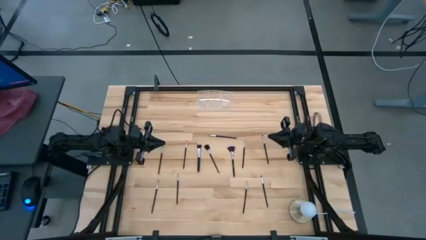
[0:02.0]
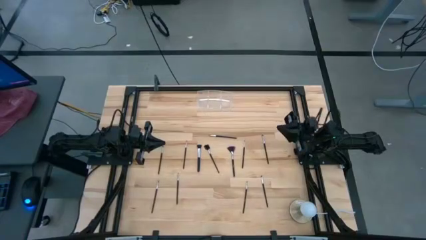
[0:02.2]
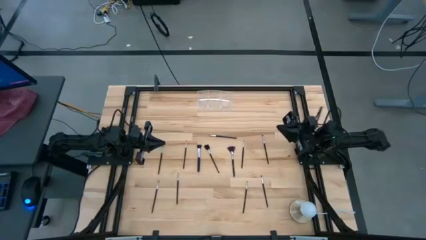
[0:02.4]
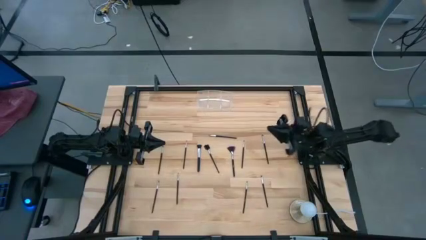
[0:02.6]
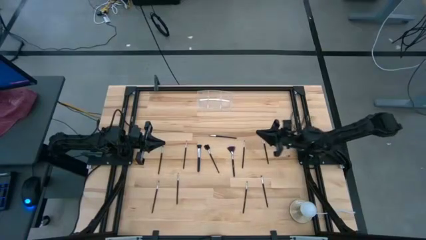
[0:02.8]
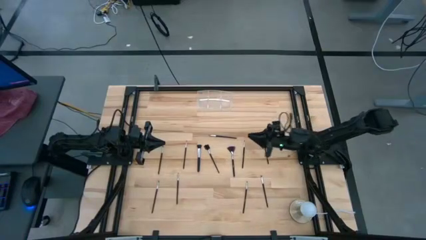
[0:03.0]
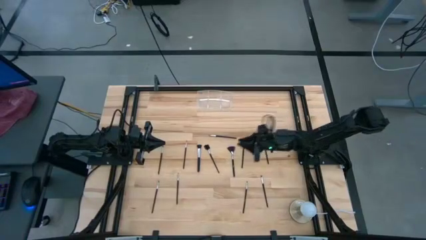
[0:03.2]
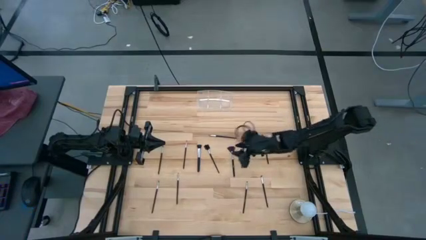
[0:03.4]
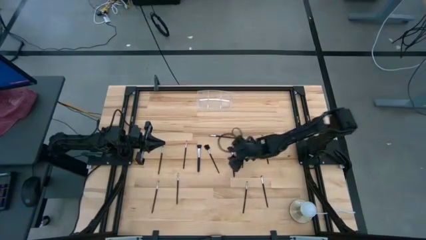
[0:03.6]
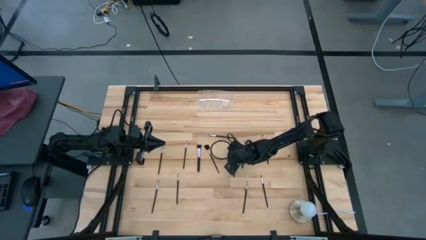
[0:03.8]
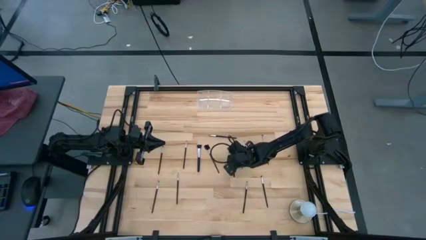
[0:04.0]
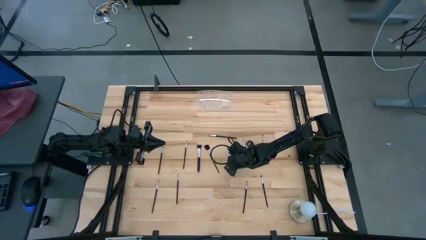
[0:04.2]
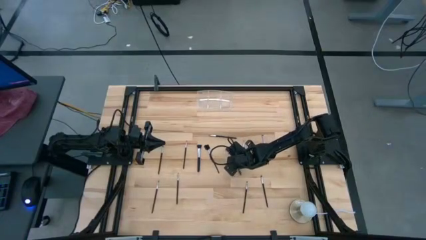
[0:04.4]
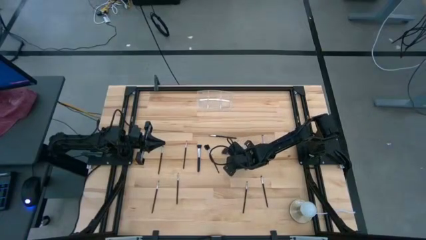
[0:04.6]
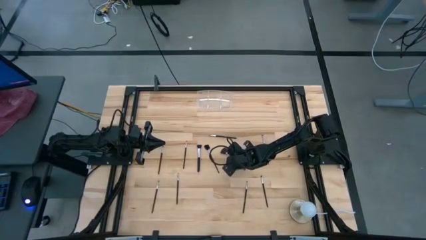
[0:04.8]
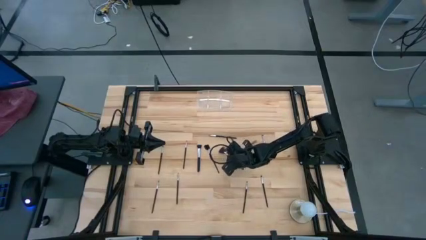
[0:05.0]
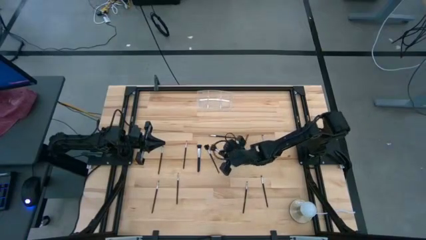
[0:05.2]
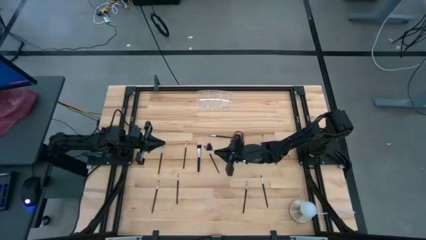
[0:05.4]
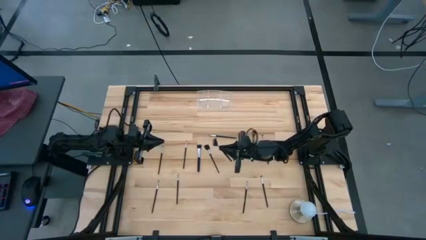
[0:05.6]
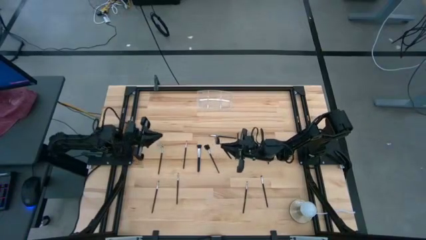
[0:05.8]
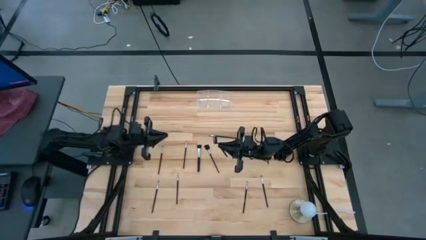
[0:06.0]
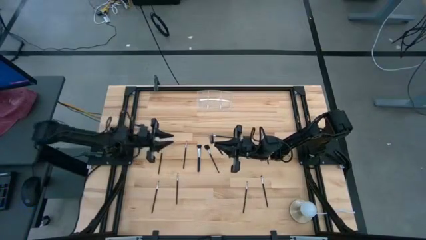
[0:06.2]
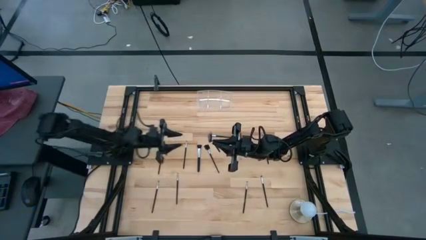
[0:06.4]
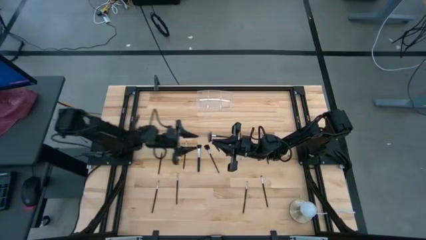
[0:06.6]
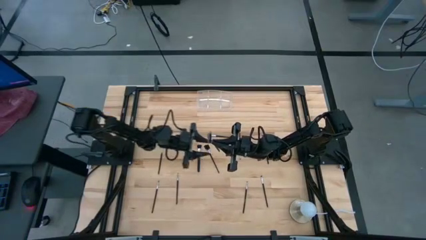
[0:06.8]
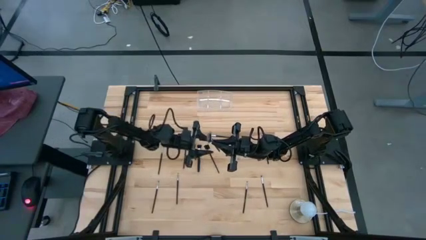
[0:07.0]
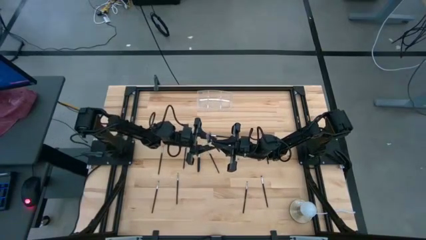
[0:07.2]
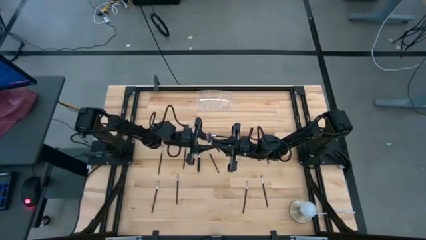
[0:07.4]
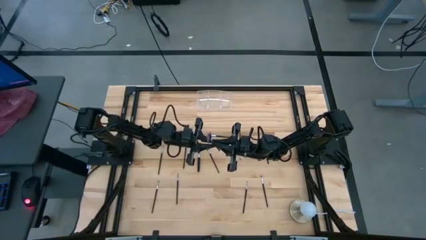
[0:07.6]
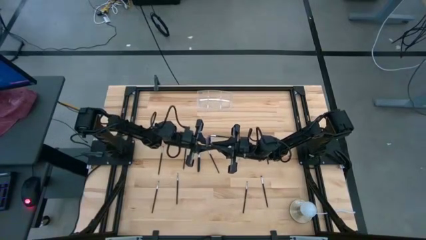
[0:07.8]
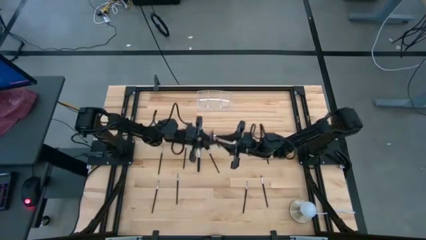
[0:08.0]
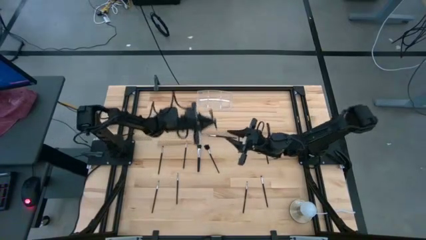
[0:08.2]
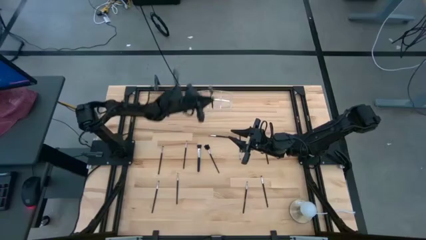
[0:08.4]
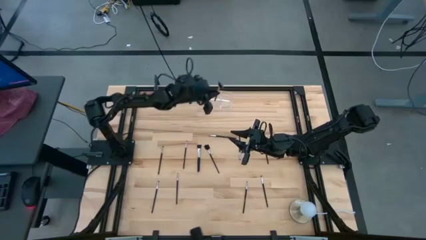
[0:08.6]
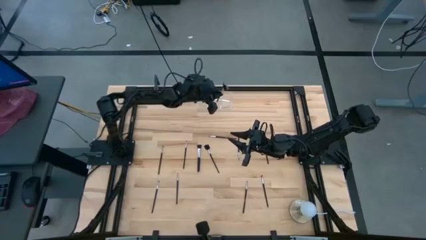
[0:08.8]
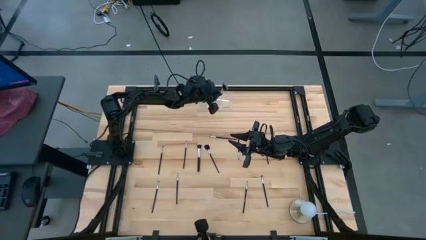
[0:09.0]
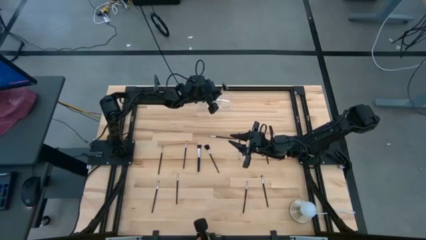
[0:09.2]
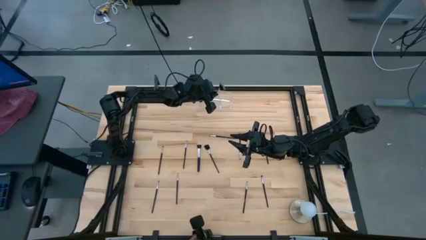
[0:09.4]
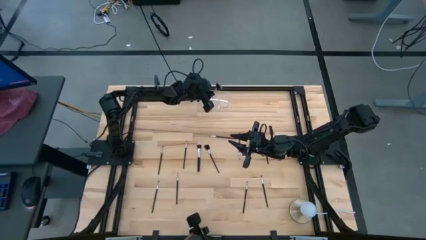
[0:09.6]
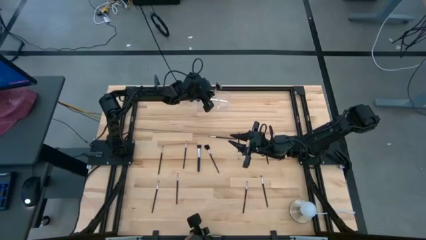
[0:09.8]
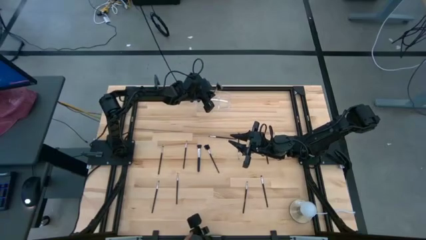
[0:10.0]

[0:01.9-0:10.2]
Task: Put items in baskets/containers
Put the black highlighter brush into the transparent organizer

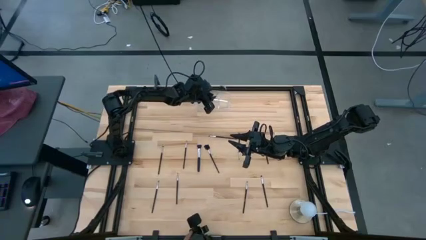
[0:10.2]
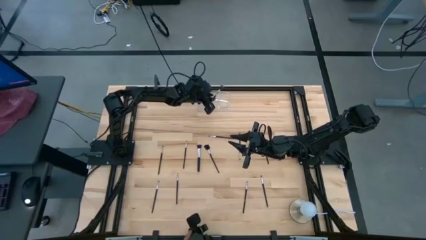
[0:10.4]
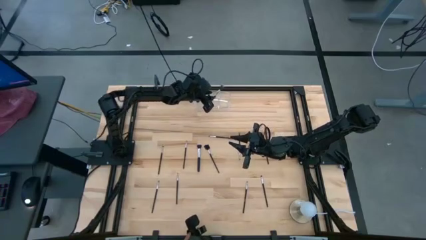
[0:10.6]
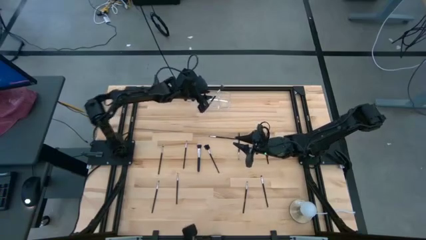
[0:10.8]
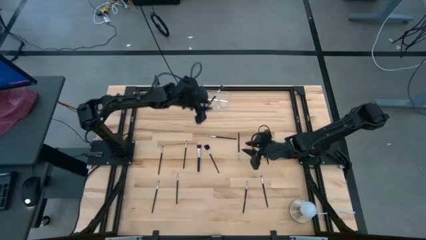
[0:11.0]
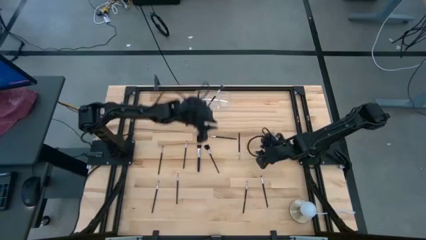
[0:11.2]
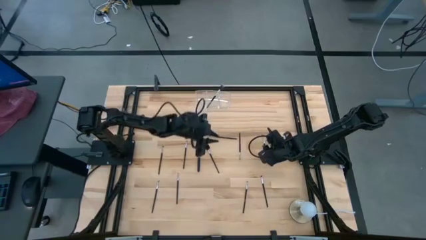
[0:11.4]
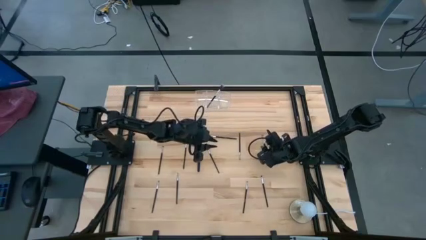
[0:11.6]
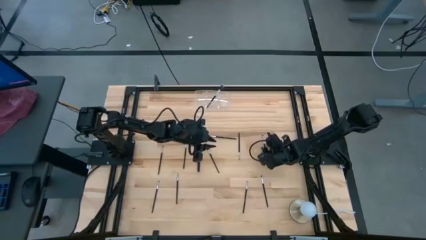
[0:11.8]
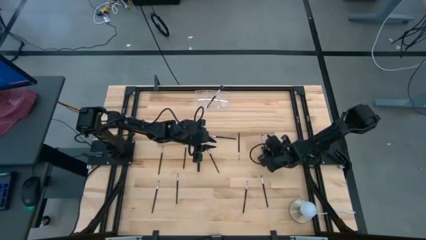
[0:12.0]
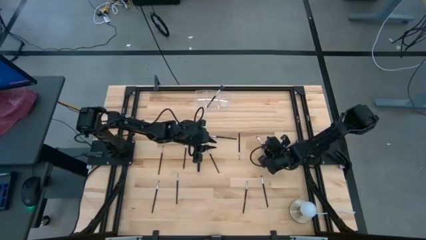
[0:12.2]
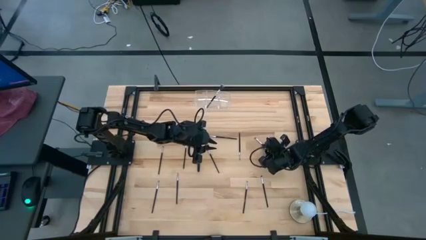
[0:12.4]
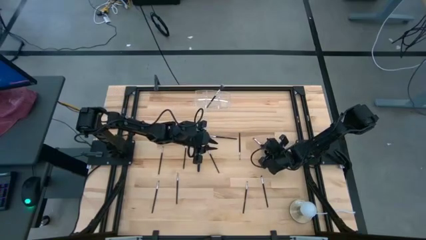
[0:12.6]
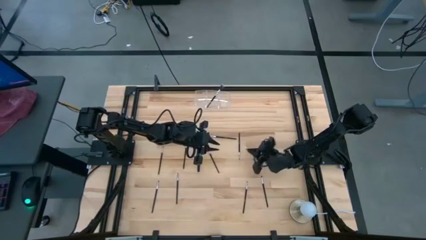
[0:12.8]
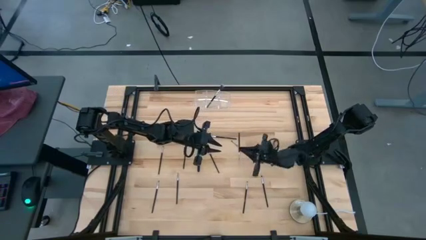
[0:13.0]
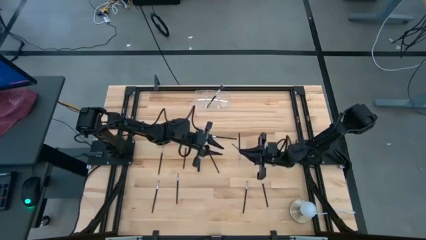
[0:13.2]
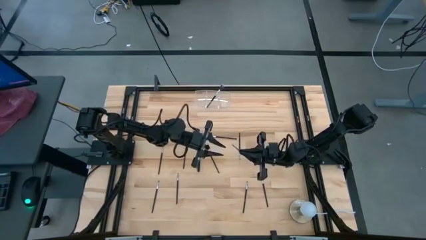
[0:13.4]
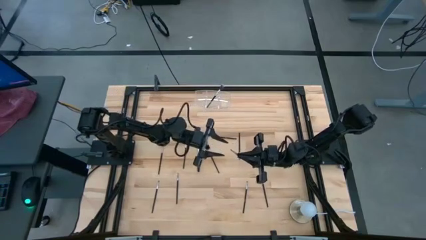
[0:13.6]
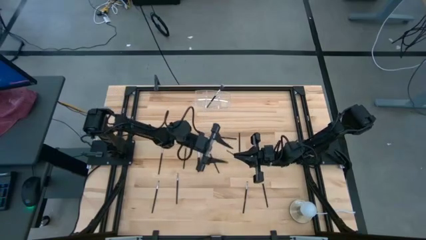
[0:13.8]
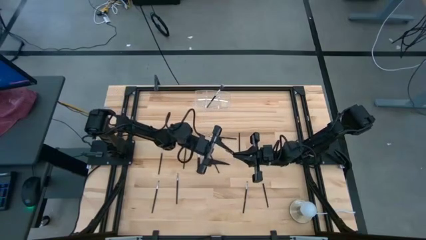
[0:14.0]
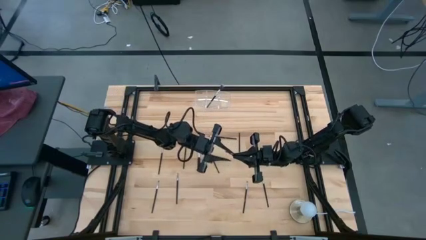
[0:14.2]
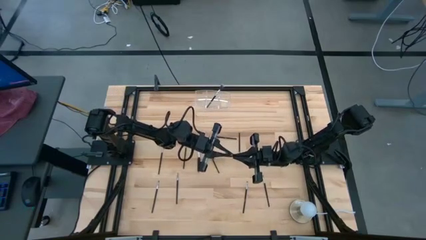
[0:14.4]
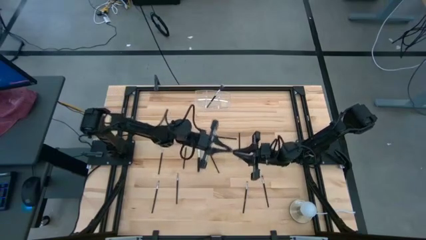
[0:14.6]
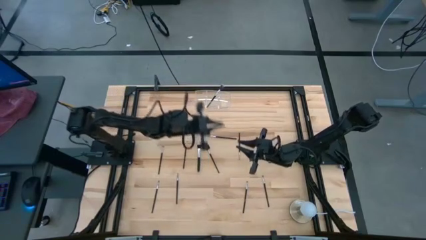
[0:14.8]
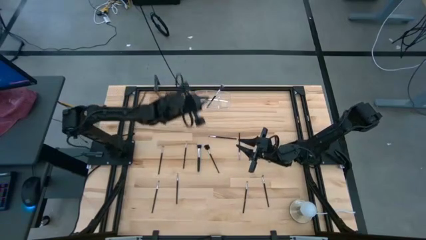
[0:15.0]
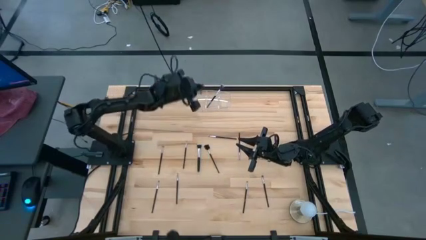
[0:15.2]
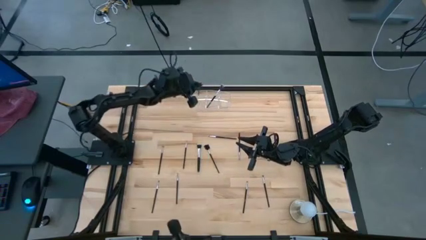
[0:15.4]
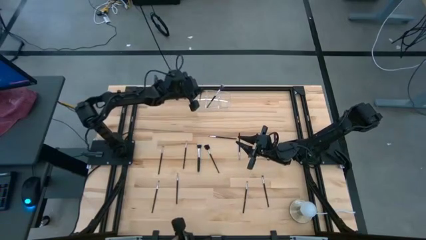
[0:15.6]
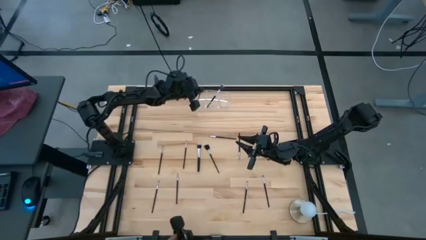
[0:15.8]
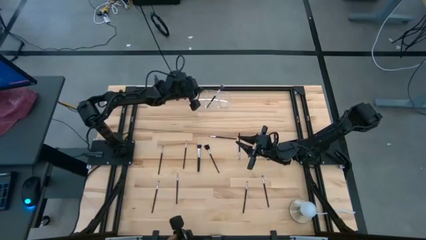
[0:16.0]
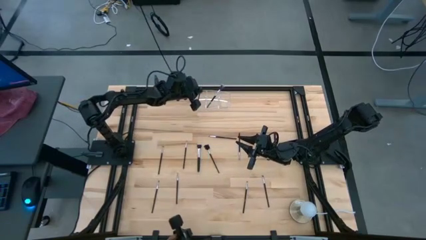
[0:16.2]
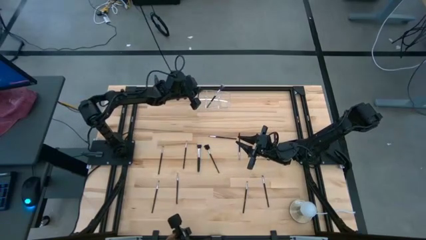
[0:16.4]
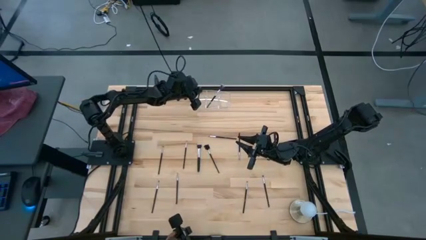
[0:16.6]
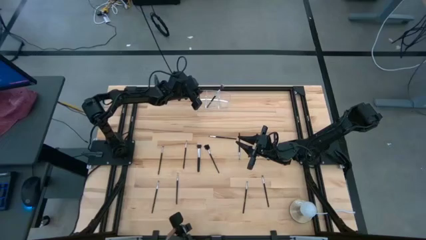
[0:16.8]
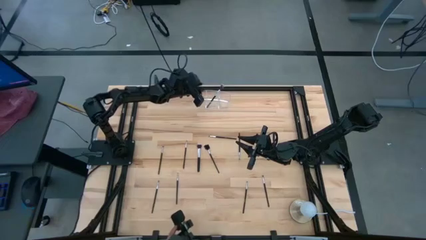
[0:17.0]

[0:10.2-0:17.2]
Put the black eyeshadow brush into the transparent organizer

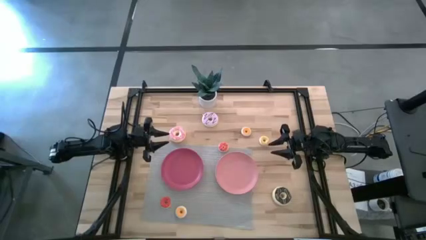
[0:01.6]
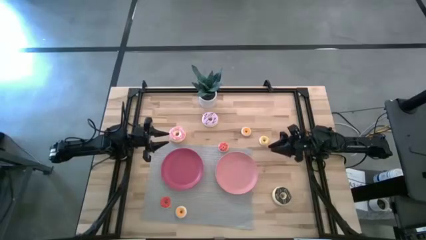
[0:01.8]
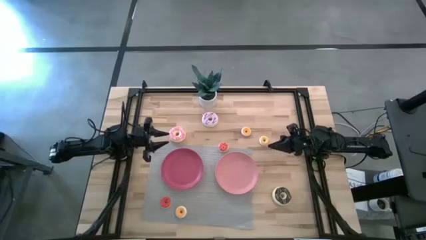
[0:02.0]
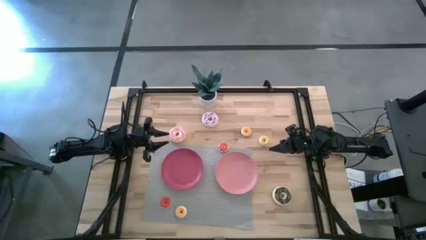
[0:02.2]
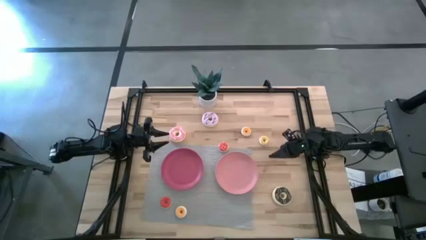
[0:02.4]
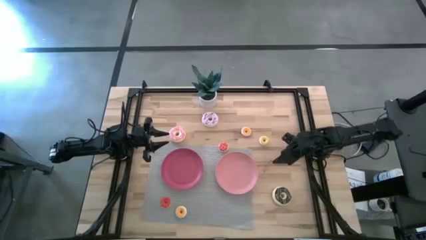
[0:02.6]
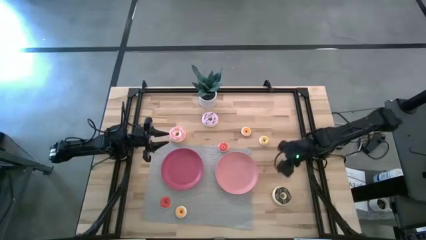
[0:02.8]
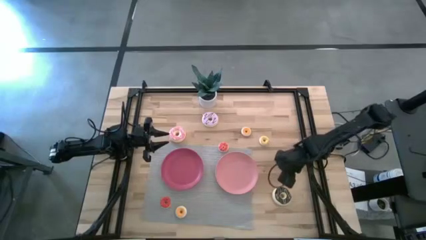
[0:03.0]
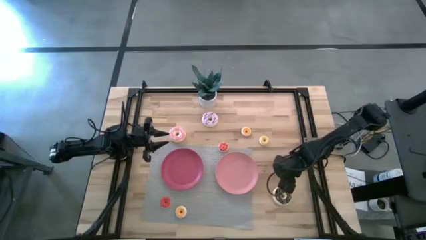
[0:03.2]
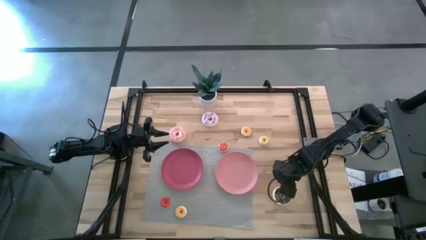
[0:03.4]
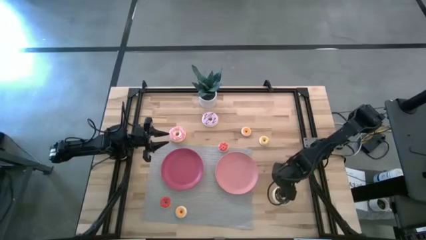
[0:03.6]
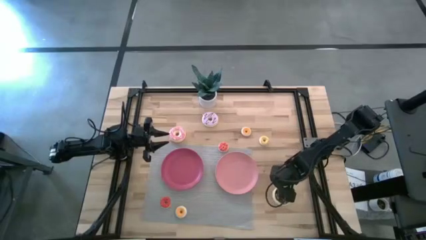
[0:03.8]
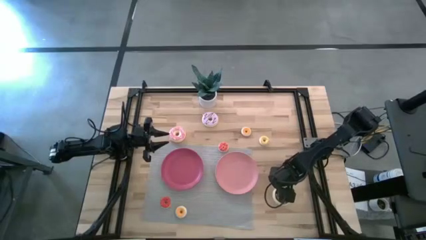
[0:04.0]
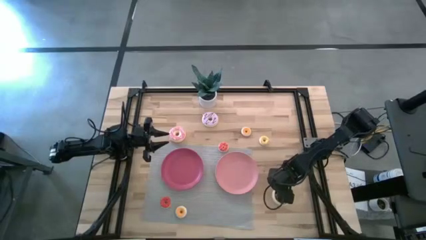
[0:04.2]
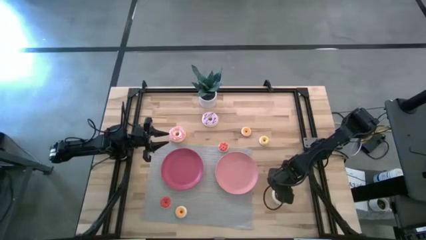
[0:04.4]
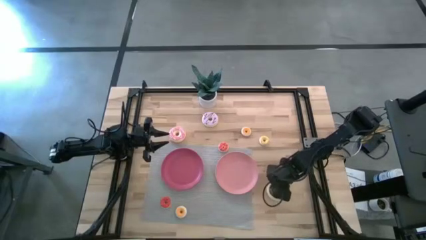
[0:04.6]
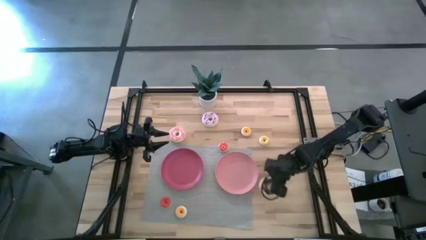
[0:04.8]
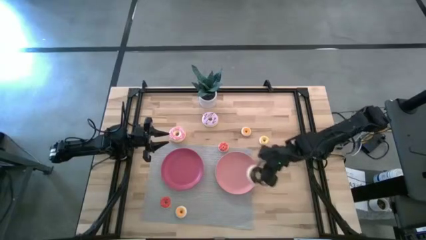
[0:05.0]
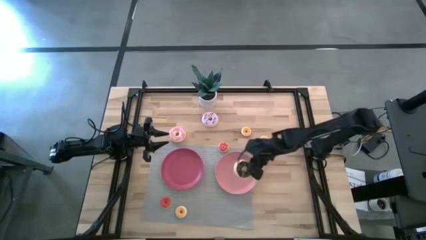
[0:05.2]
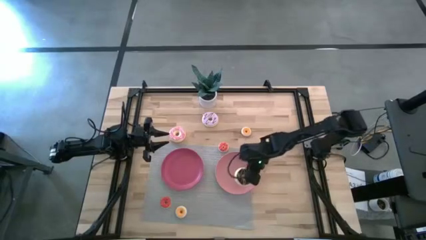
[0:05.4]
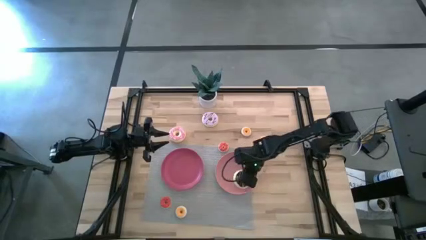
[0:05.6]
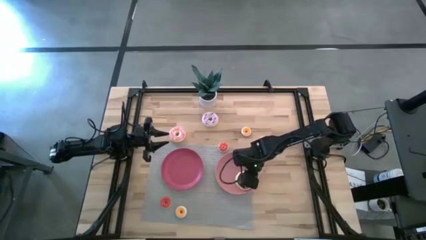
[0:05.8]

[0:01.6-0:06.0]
Task: Pick & Place donuts
Put the large black donut on the light pink plate
